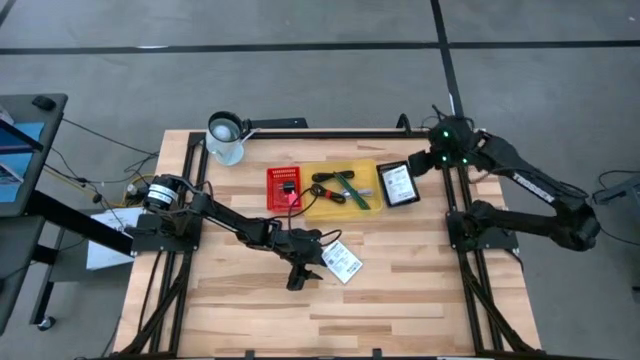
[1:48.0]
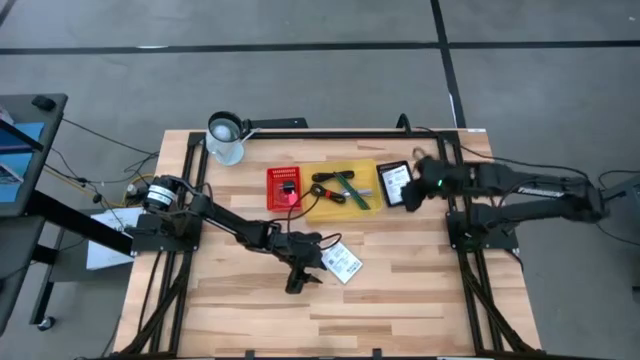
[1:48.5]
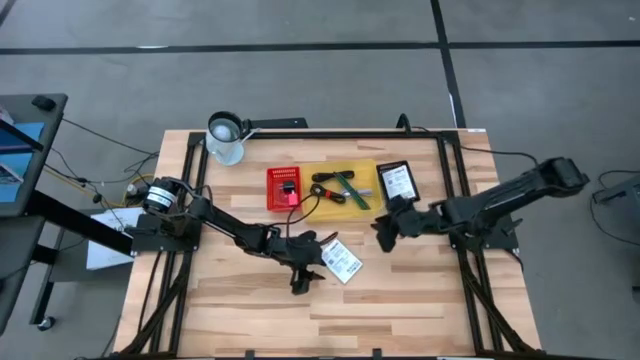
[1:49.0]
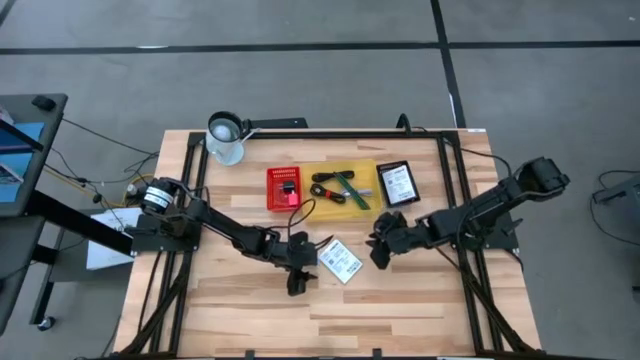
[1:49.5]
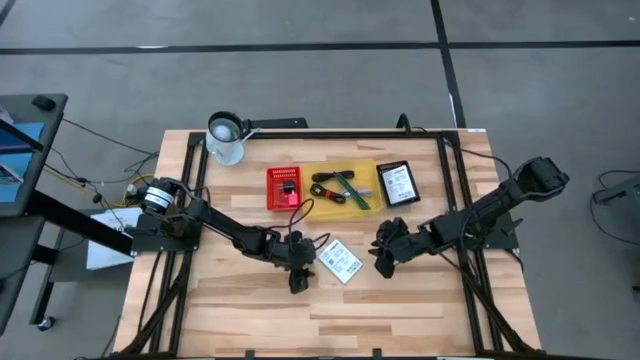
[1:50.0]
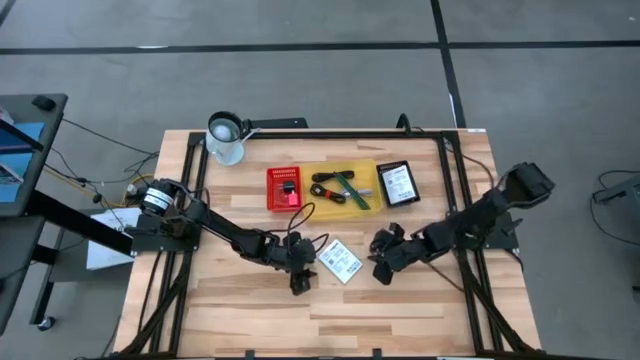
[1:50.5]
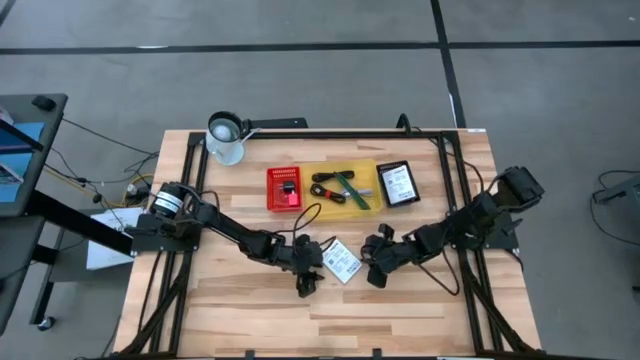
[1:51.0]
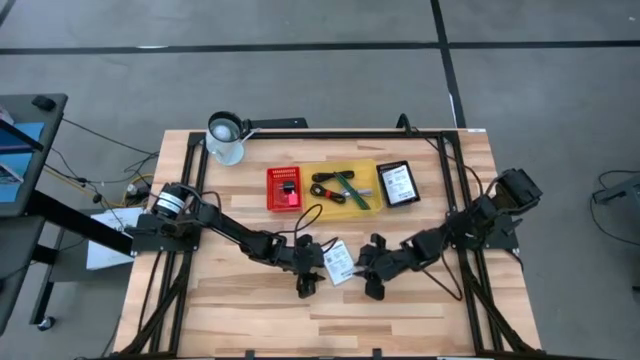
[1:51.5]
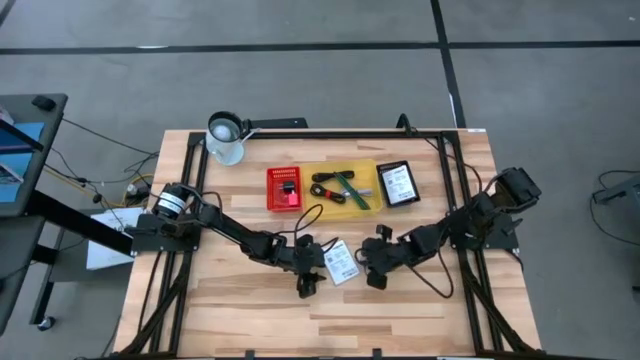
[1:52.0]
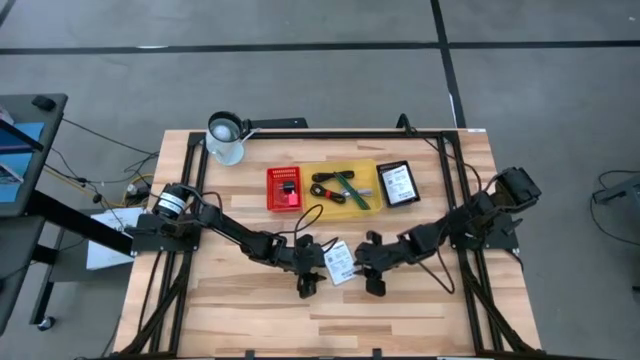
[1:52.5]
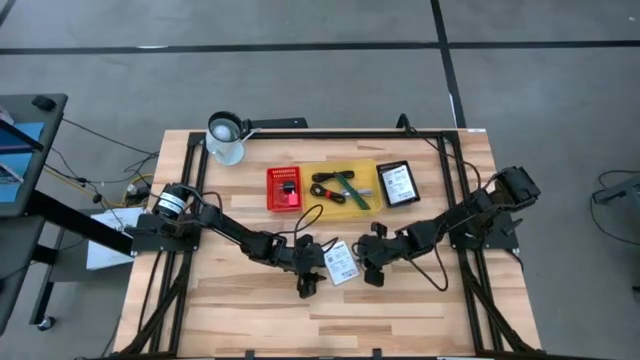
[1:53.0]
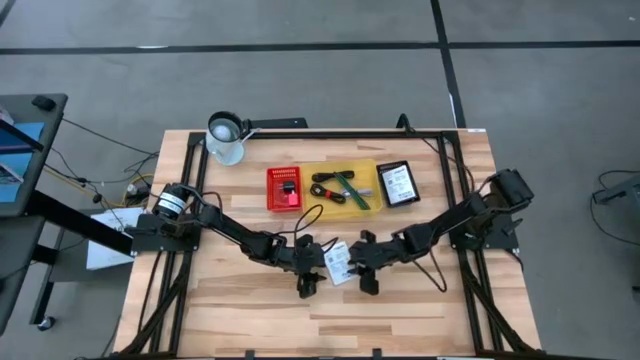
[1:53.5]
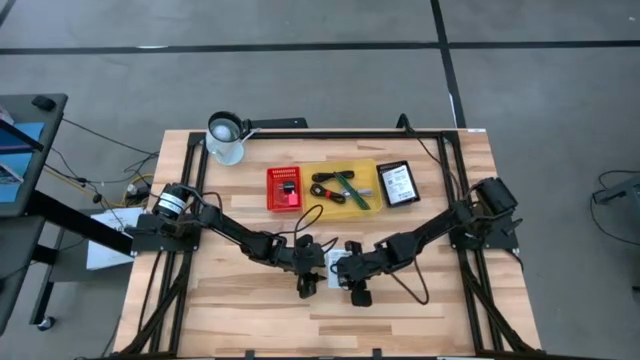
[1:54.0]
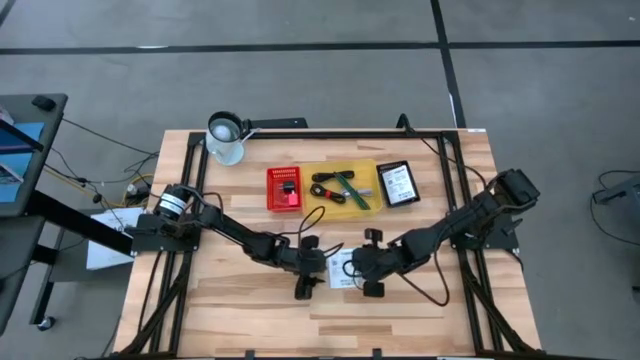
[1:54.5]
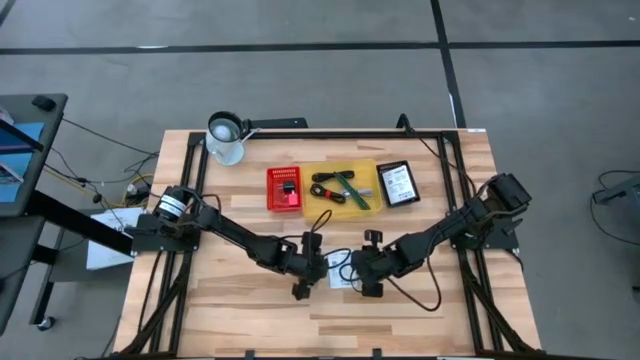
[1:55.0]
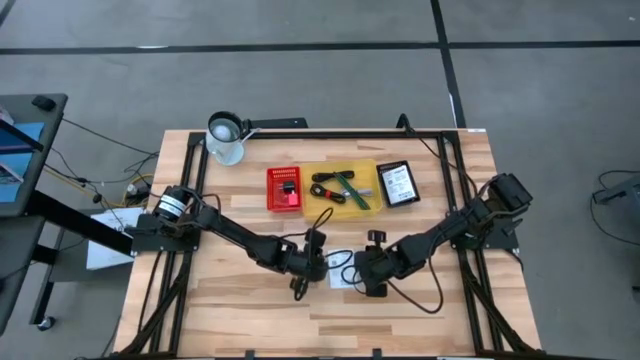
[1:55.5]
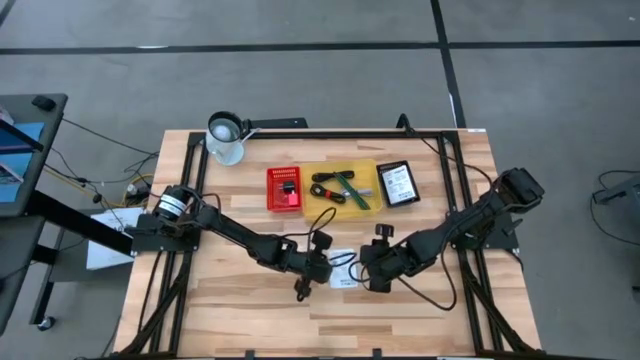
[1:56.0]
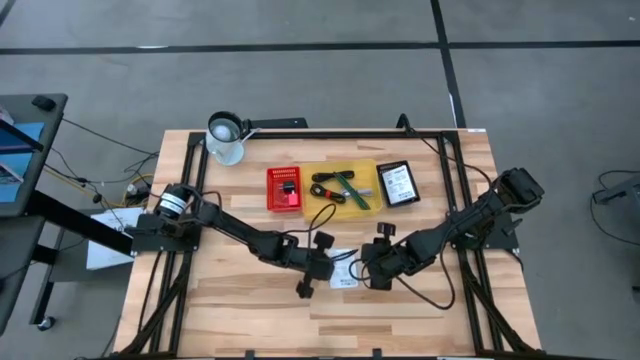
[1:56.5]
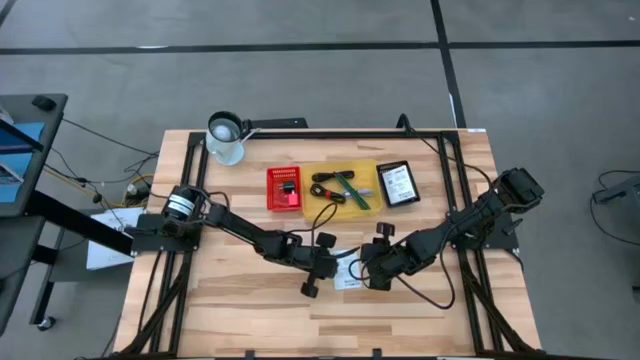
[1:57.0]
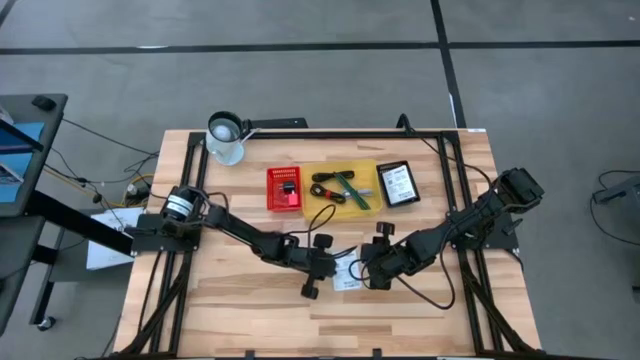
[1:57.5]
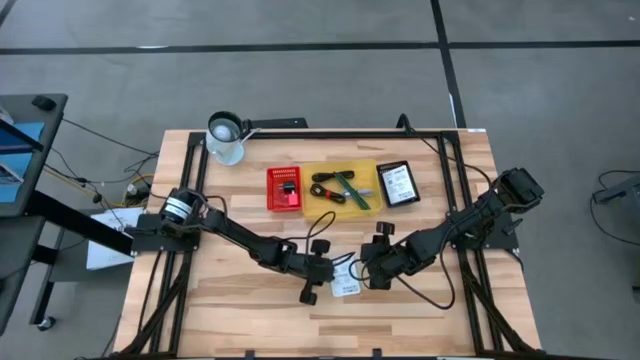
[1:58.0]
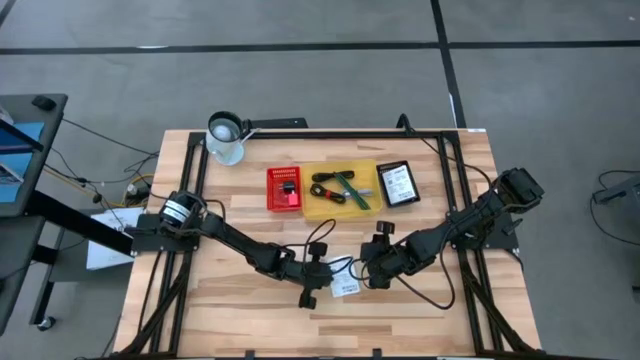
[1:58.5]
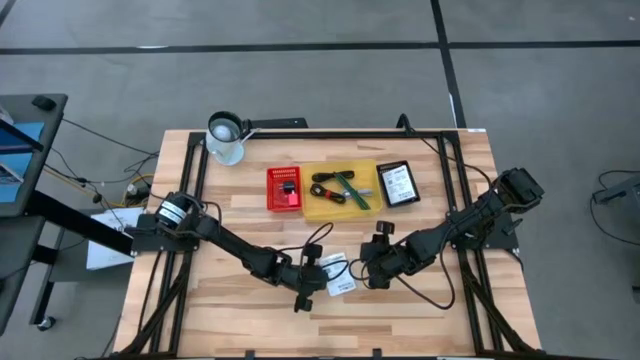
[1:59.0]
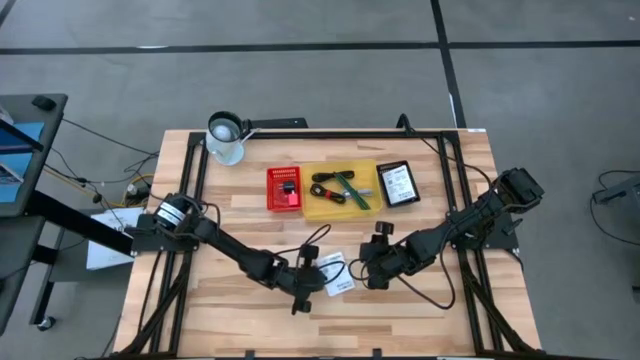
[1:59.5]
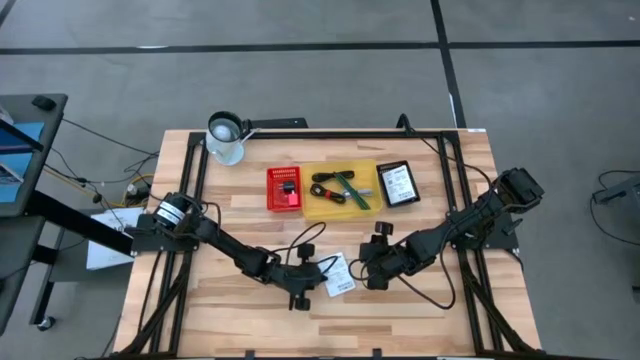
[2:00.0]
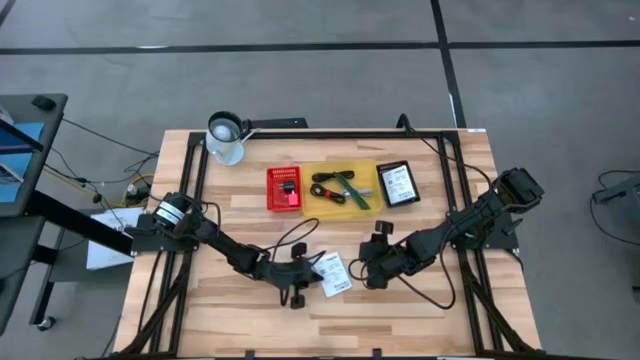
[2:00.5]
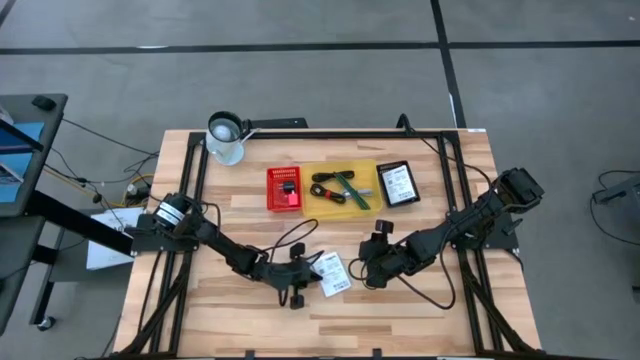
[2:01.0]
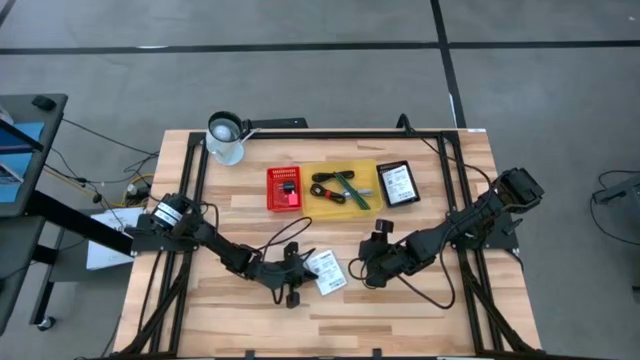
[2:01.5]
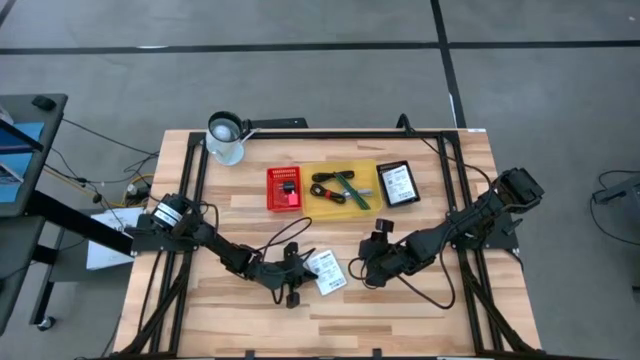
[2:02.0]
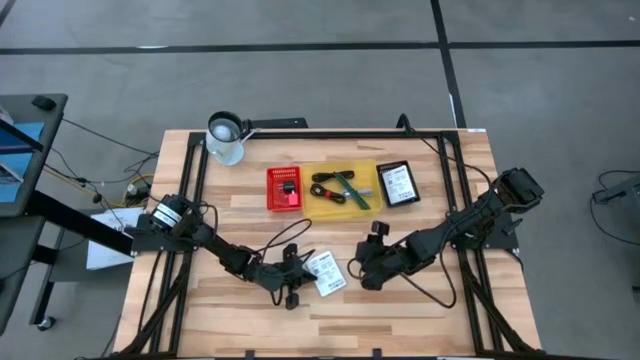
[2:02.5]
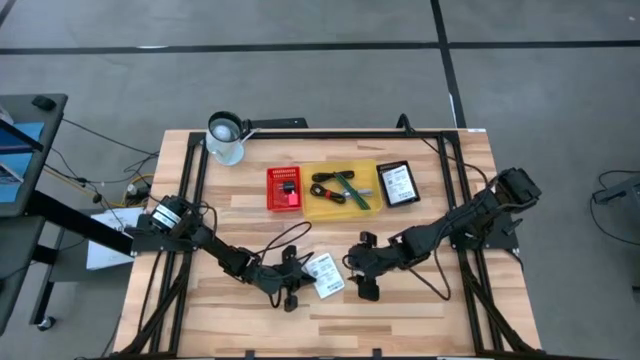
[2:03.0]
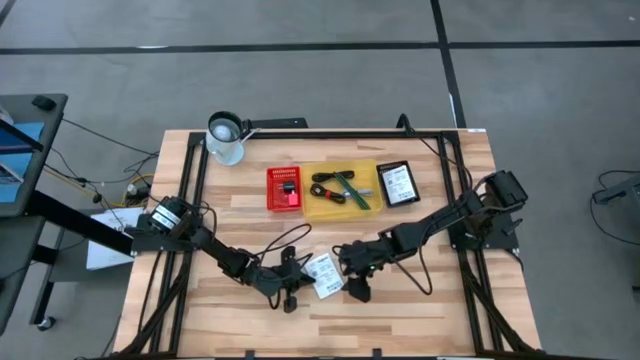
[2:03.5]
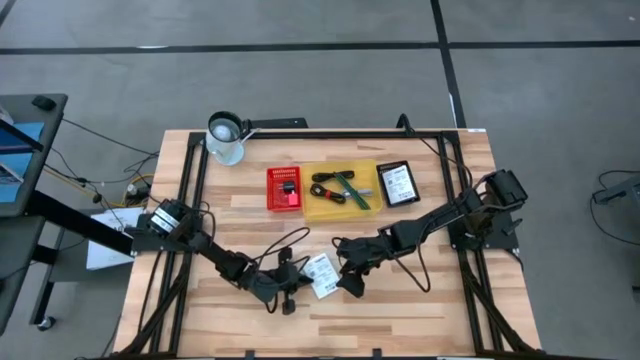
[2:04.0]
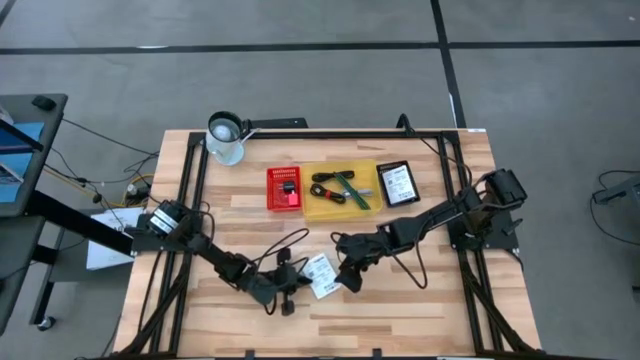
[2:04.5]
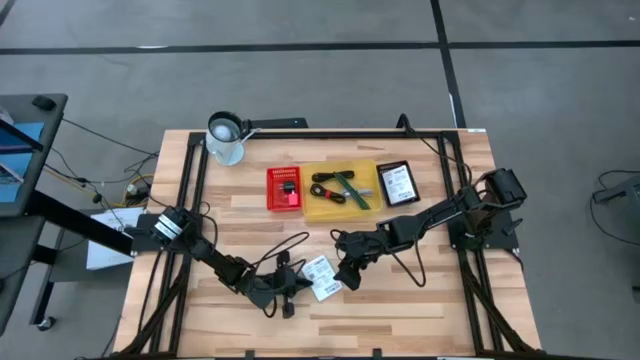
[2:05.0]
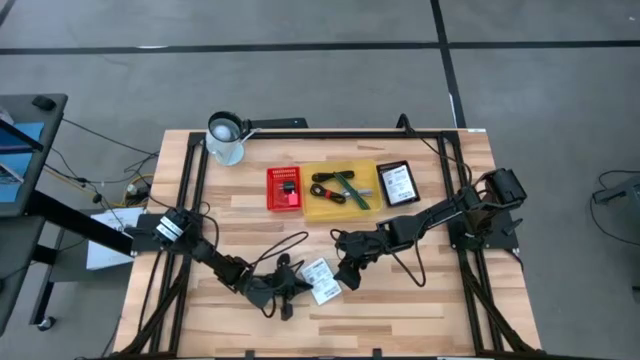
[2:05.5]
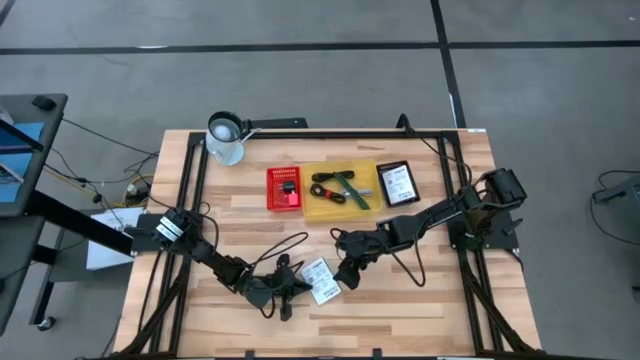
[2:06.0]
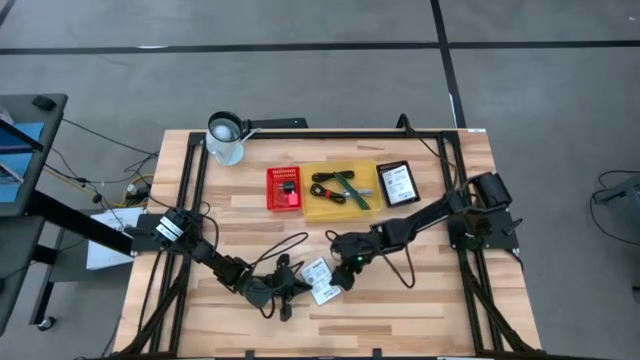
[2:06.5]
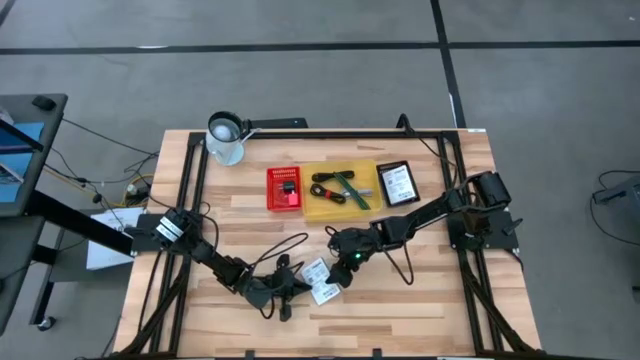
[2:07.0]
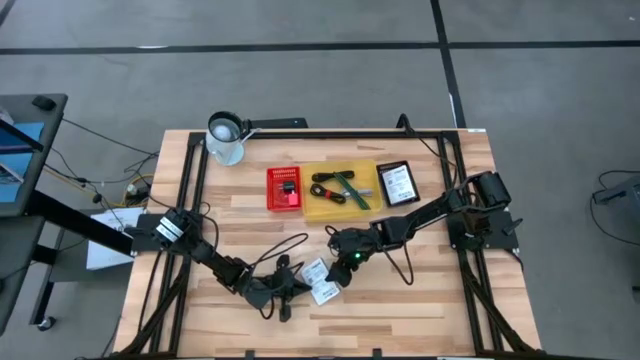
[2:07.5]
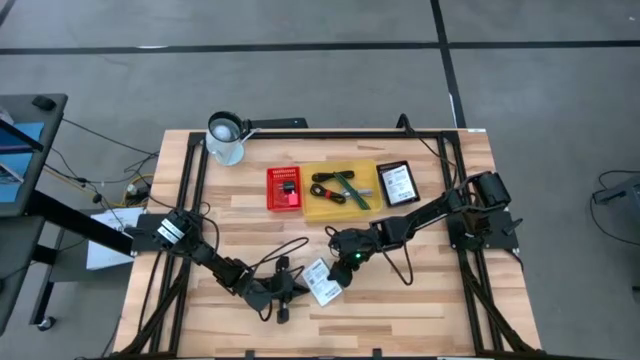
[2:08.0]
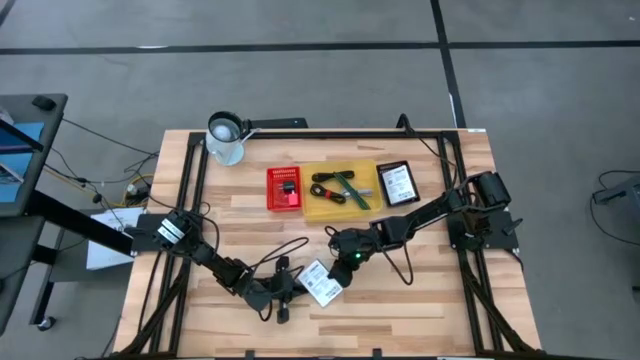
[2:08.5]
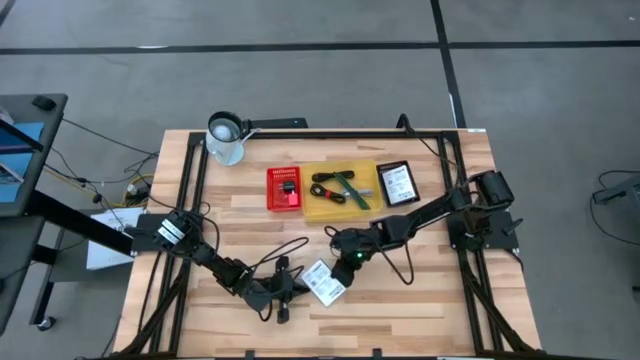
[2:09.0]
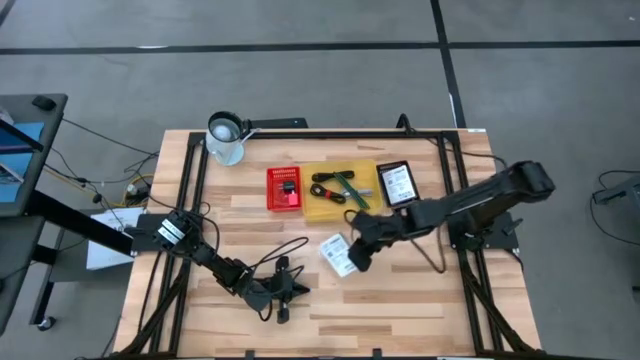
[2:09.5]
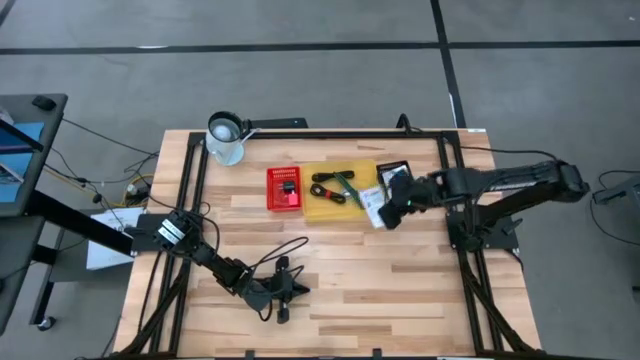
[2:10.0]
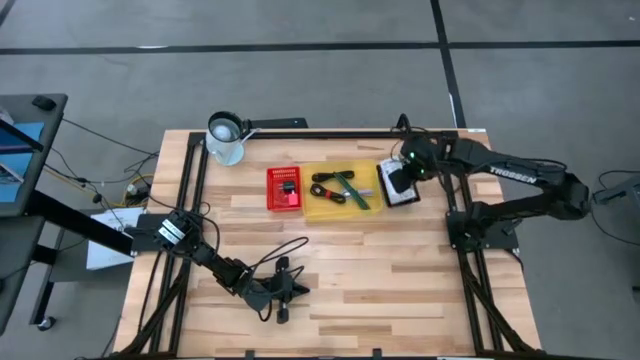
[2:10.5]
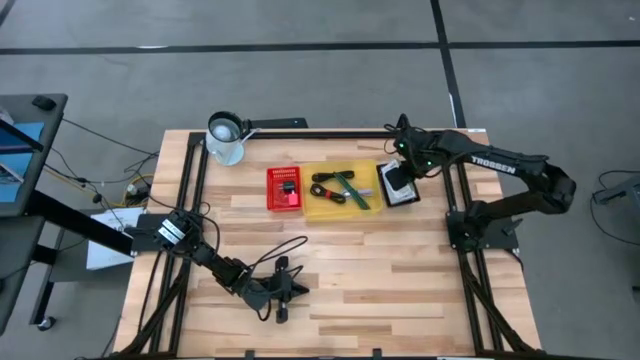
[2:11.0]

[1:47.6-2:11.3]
Task: Pick and place items into bin
Put the white card reader box into the black bin
